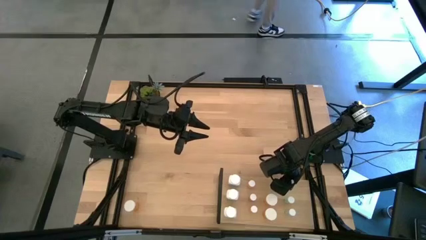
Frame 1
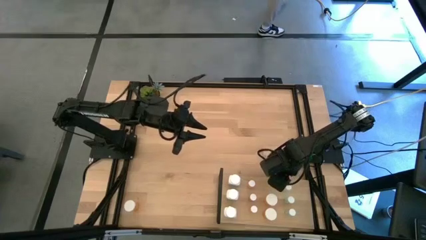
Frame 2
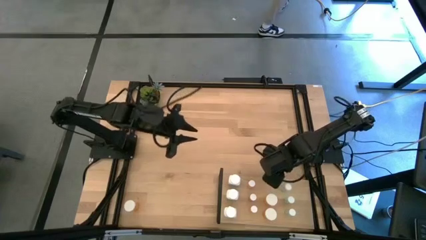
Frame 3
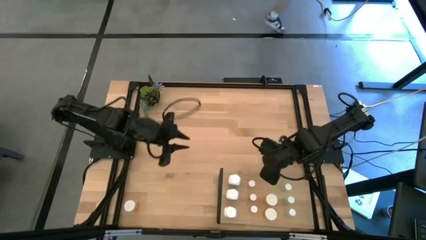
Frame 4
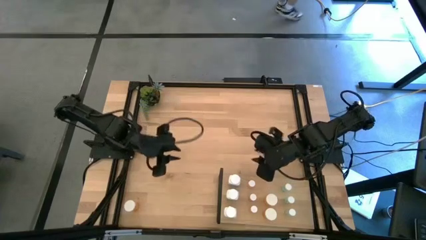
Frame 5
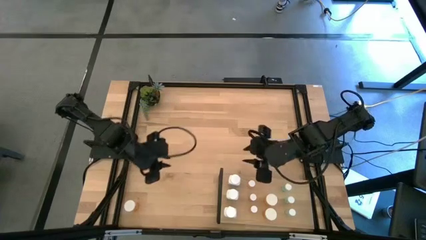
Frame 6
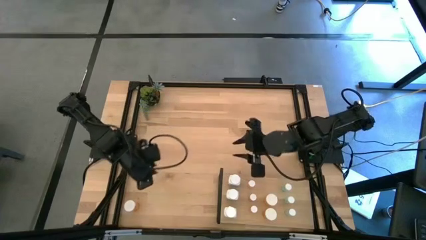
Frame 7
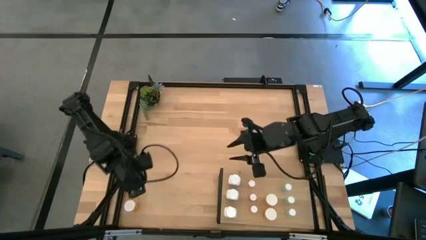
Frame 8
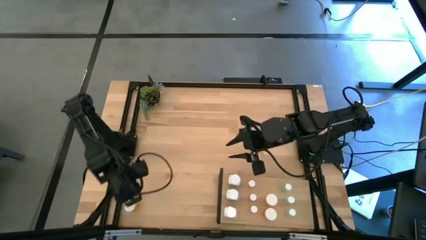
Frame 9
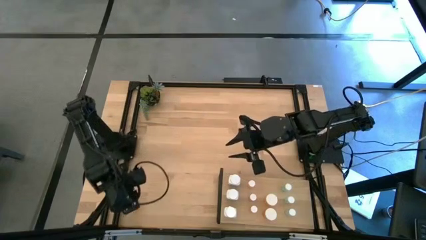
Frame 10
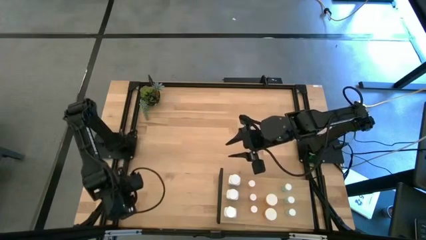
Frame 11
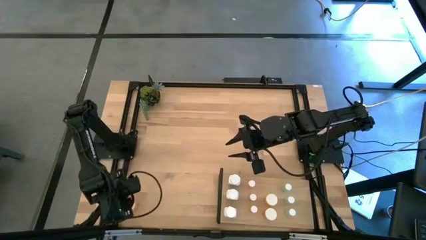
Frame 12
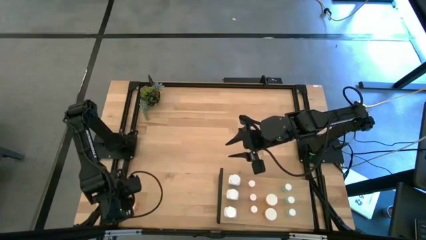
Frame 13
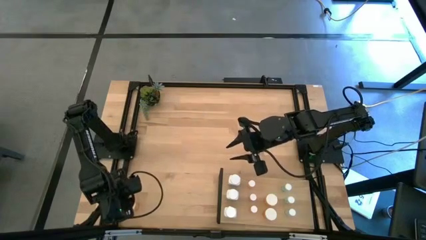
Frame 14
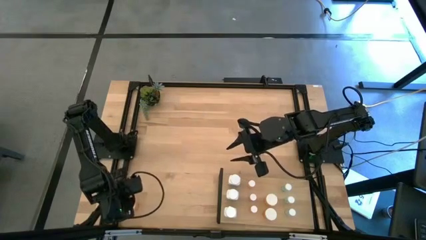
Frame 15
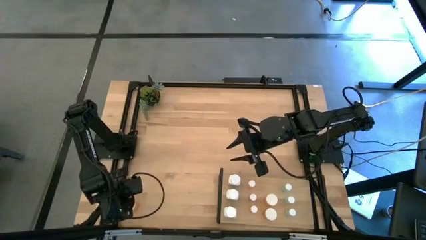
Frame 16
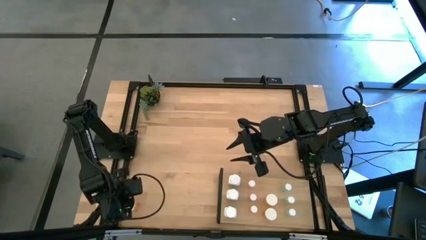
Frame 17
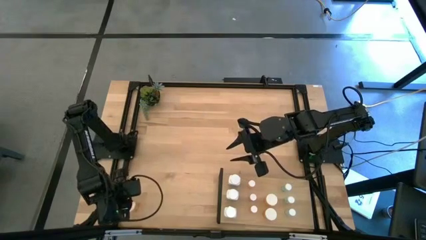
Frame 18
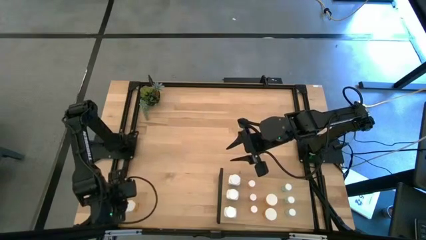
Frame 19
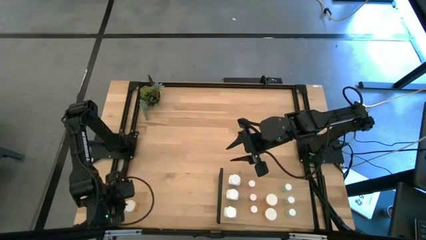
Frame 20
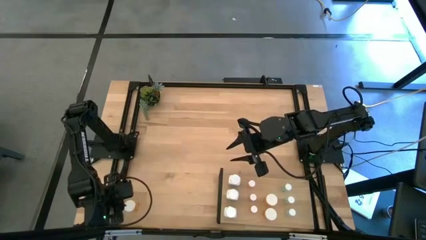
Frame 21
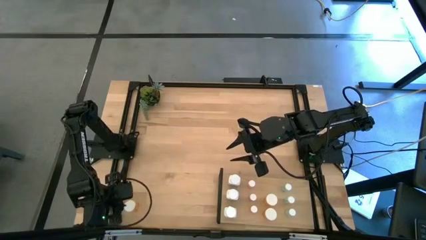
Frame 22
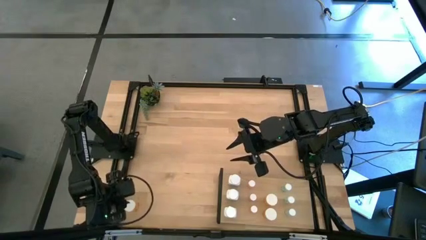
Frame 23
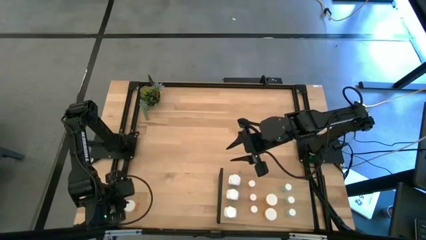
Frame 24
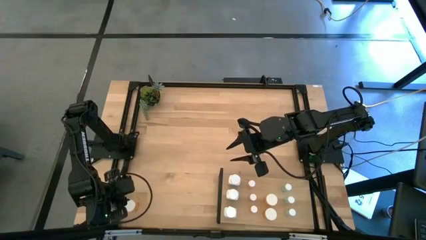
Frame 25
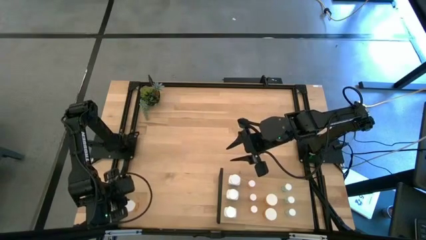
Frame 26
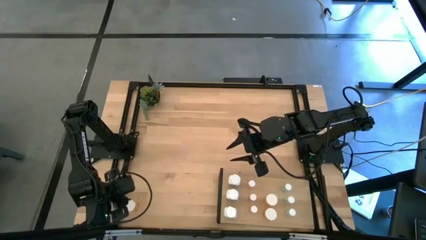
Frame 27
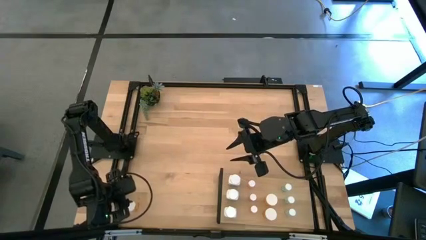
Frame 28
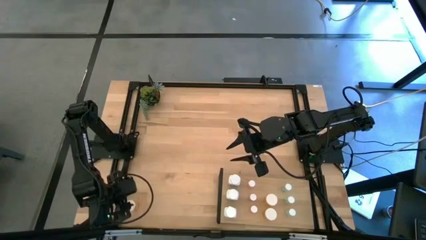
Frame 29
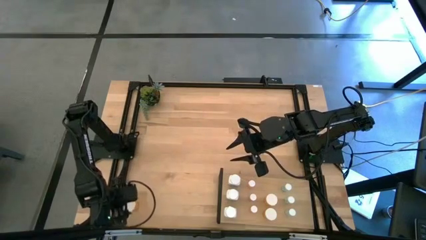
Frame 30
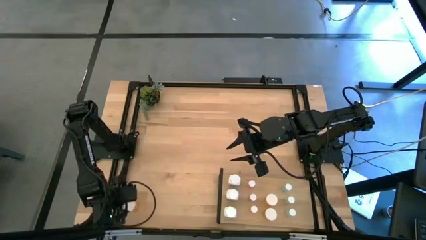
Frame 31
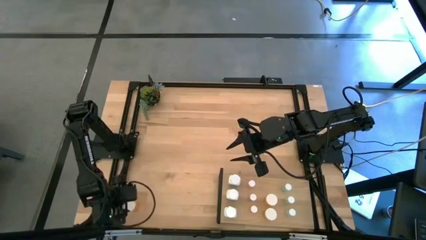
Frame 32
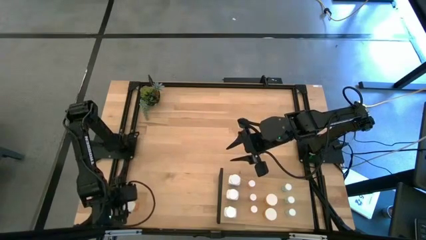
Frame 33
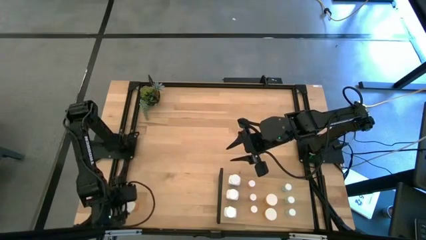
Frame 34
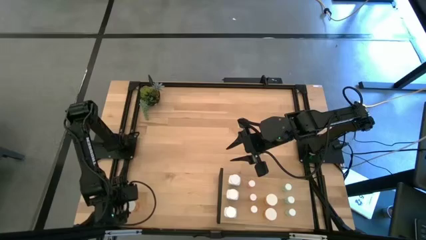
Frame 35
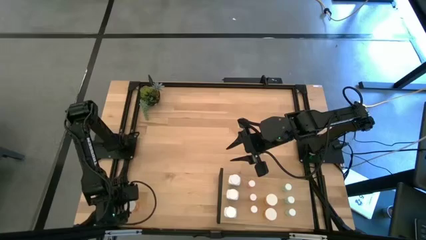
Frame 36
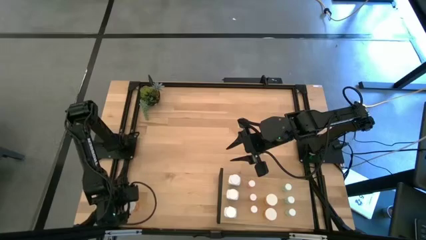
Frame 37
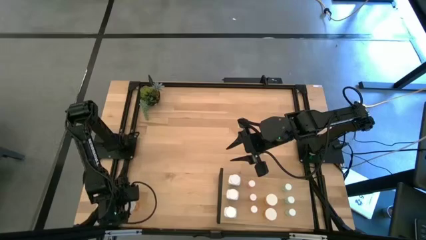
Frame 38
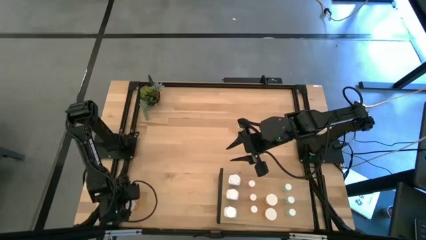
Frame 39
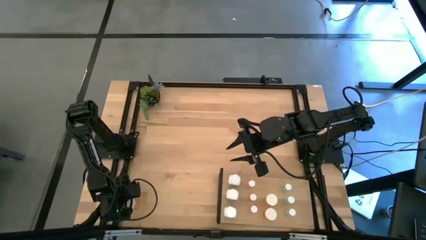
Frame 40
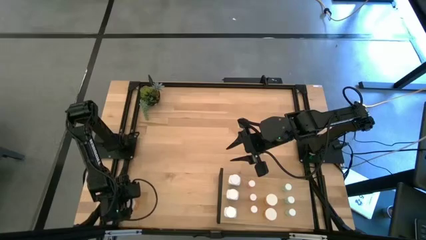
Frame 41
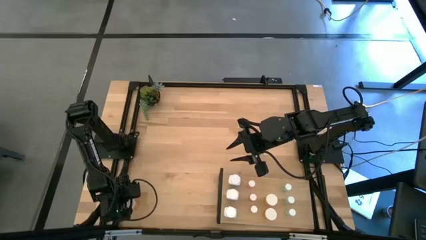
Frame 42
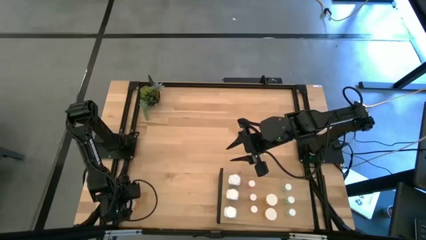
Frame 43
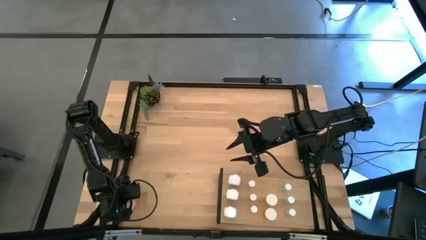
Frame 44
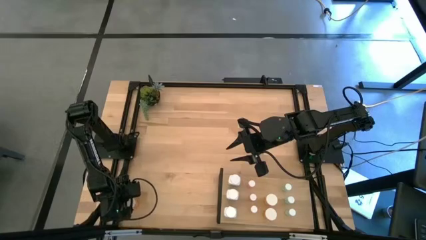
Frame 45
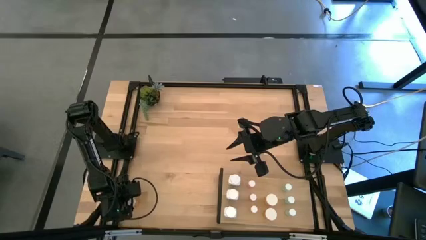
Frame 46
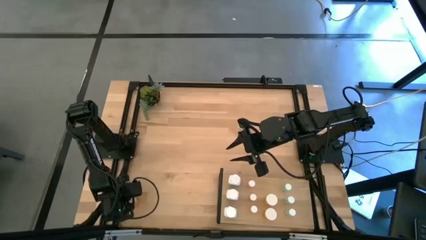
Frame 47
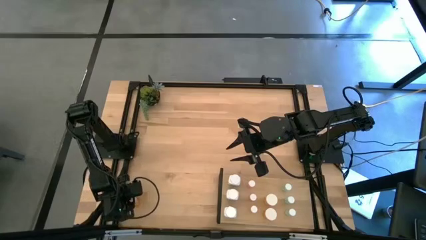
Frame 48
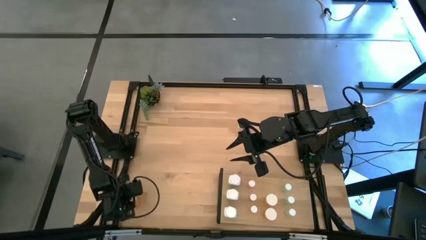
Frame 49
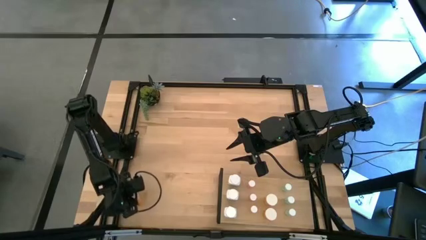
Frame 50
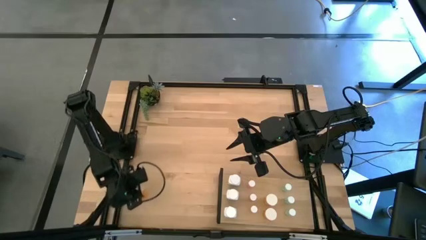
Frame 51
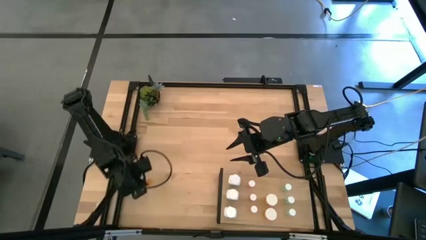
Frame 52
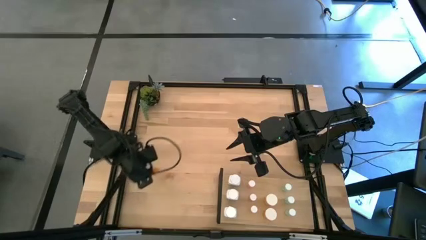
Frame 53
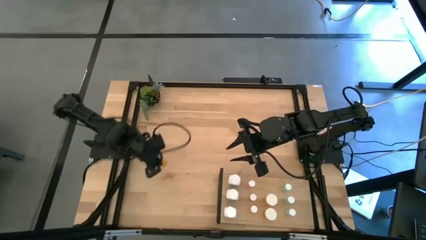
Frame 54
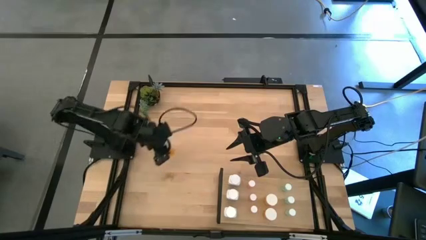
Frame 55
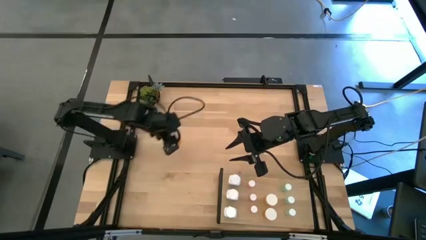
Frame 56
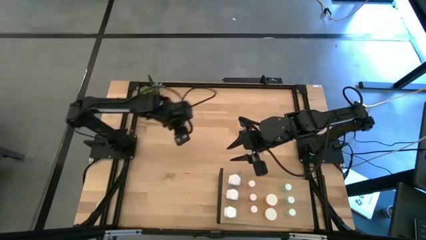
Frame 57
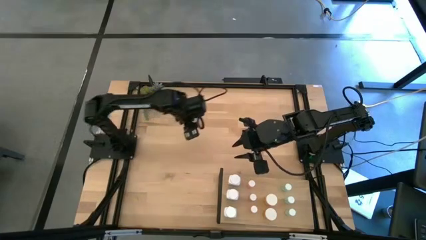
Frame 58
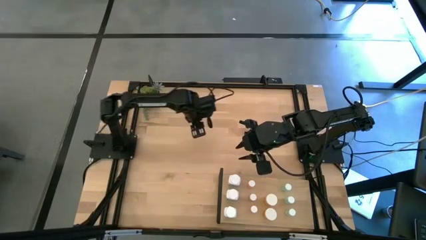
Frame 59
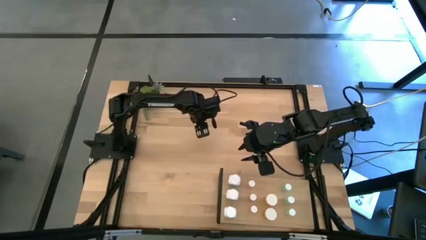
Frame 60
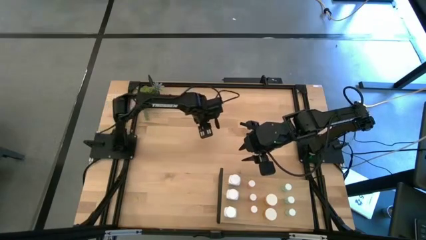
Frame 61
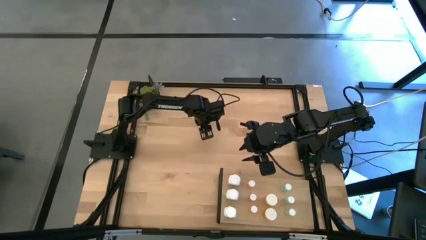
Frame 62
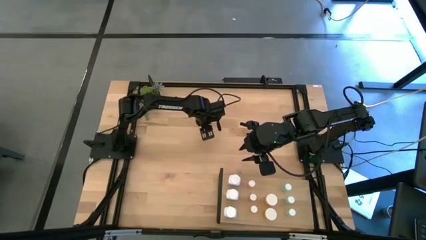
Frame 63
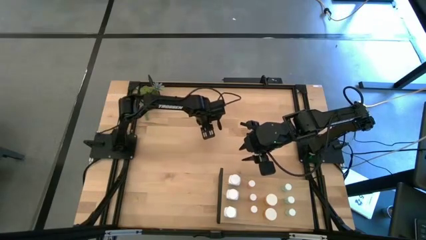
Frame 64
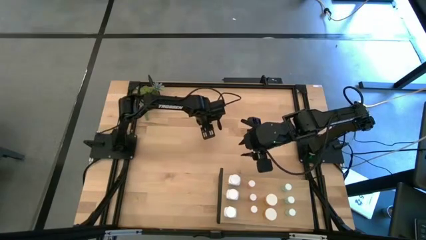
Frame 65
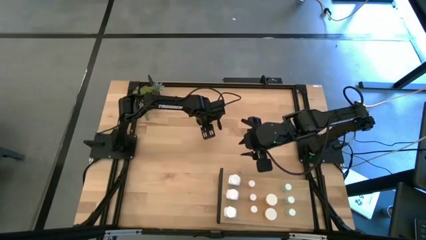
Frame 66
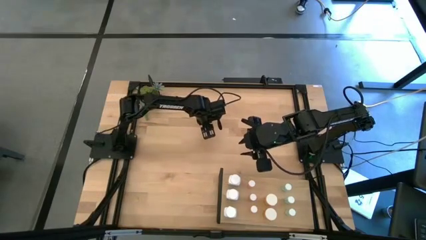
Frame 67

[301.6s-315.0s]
Task: Pick and place medicine bottles onto shelf by color
Put the orange pill bottle on the shelf
